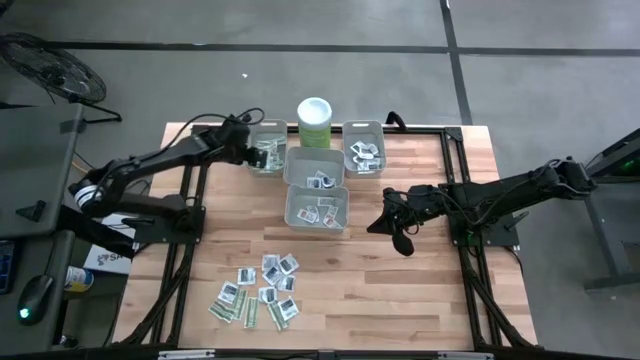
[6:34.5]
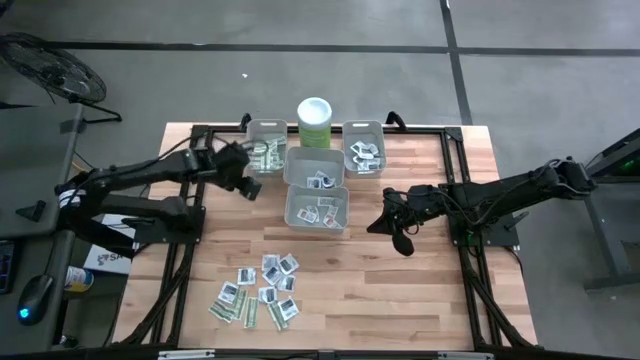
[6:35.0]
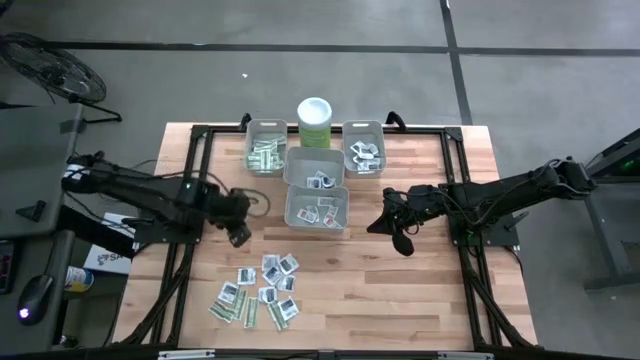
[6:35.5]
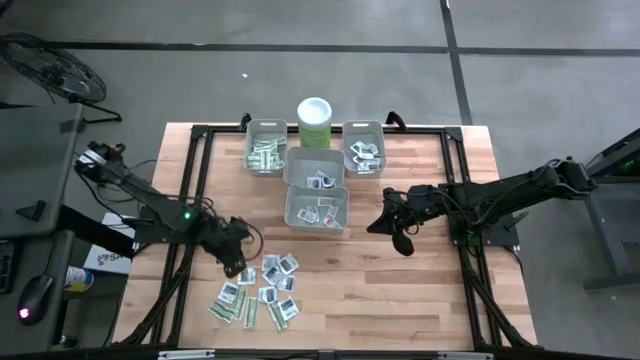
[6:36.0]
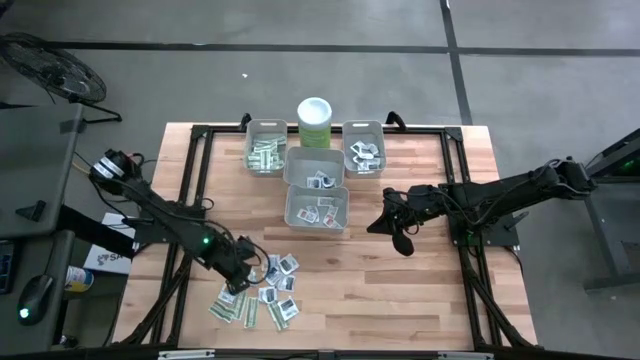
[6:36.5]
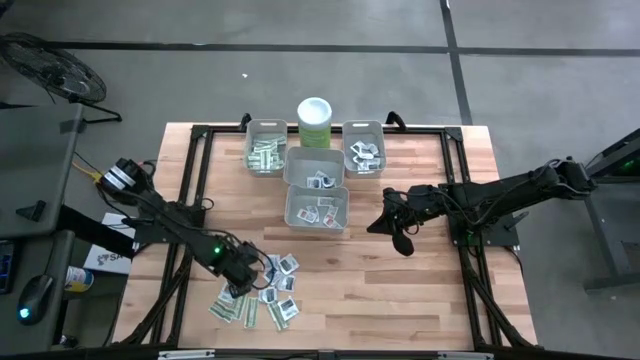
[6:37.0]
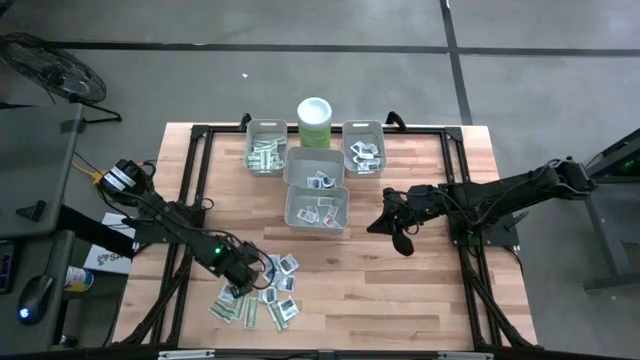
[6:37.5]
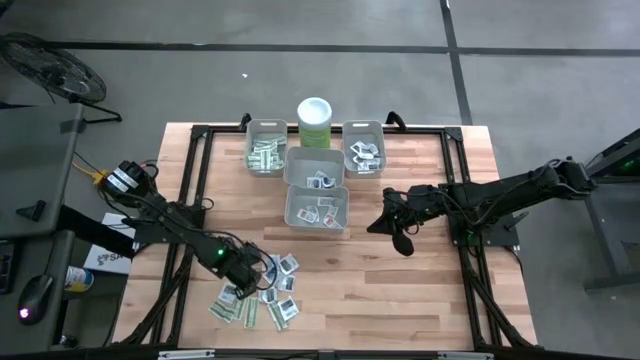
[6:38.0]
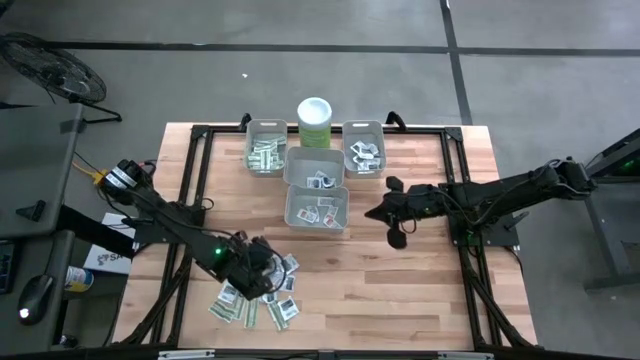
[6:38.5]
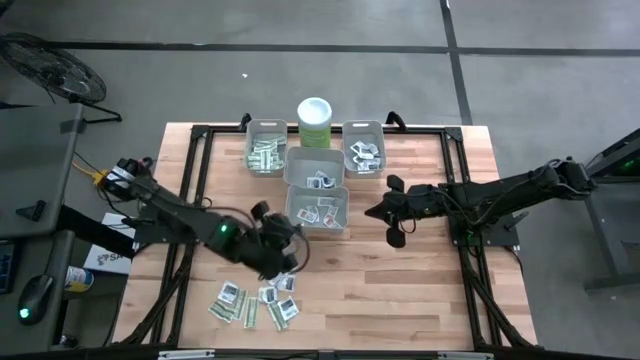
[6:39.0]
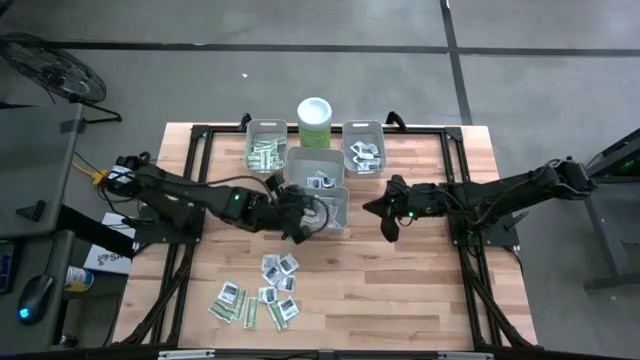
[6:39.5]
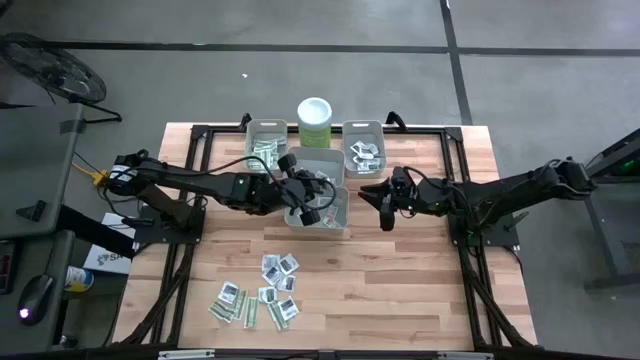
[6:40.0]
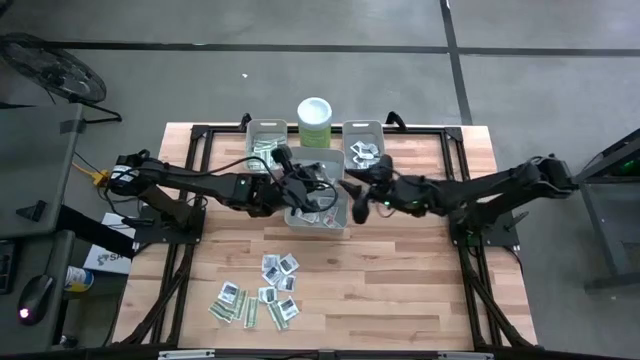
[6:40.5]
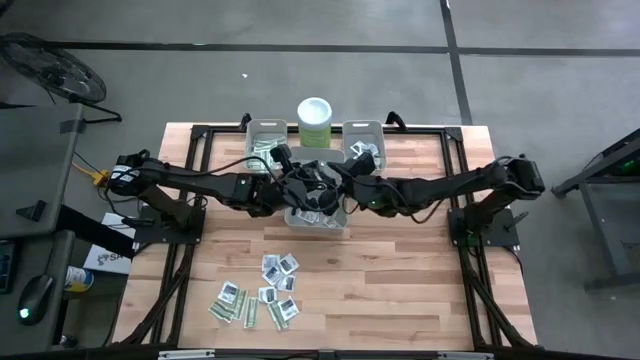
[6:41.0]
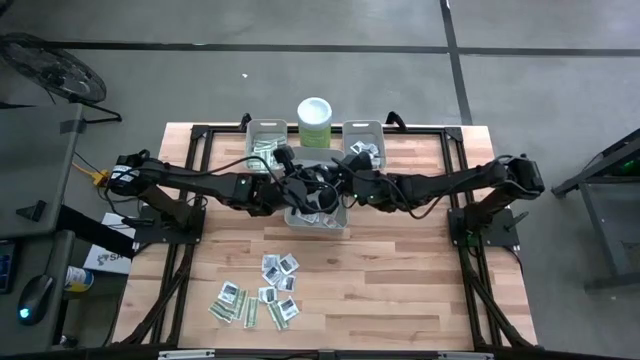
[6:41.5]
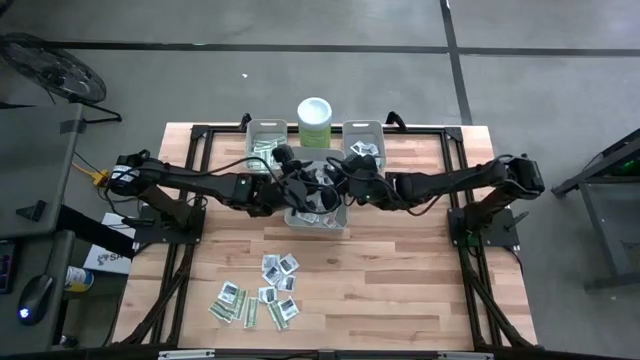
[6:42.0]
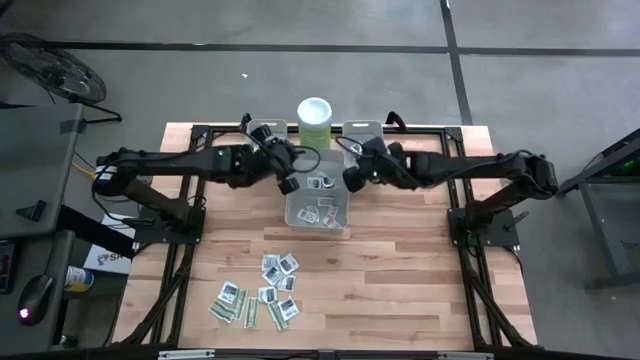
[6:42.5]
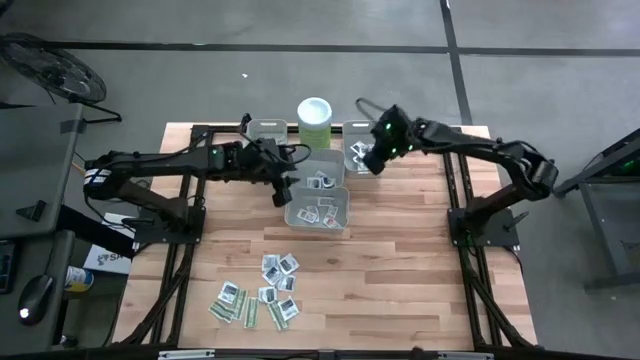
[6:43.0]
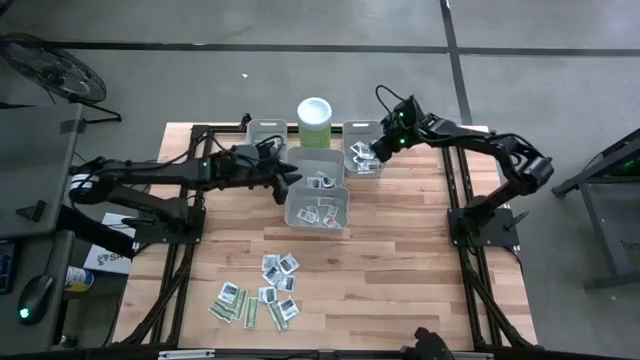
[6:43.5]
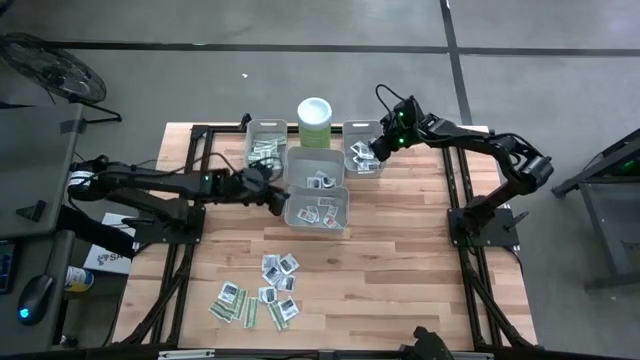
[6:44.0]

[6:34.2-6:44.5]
Task: Pick & Place First Aid Supplies
Put the towelette pack into the right bin

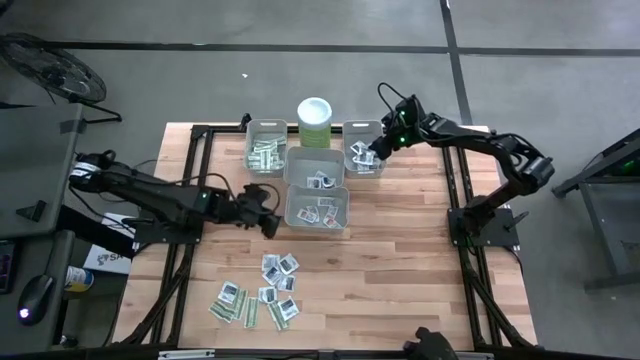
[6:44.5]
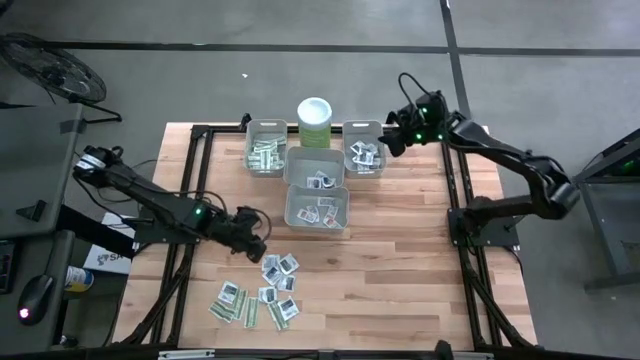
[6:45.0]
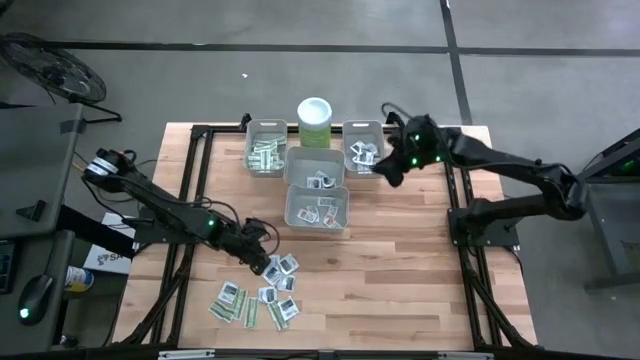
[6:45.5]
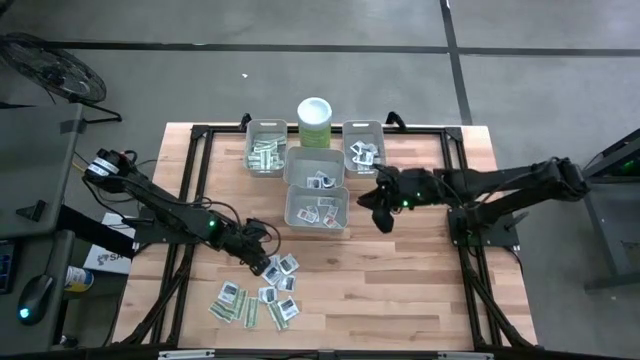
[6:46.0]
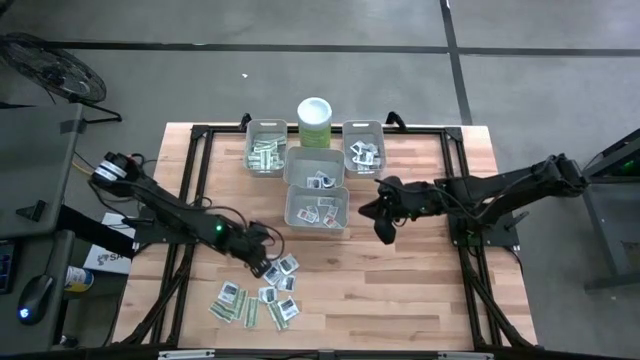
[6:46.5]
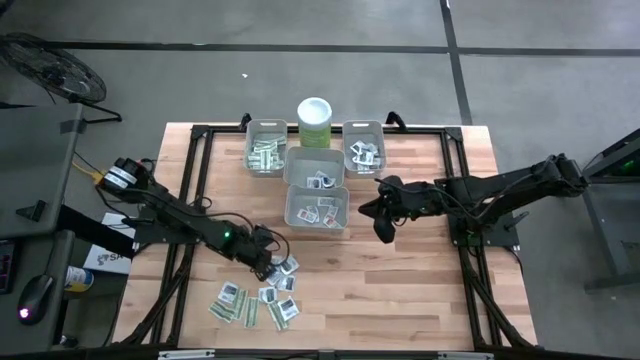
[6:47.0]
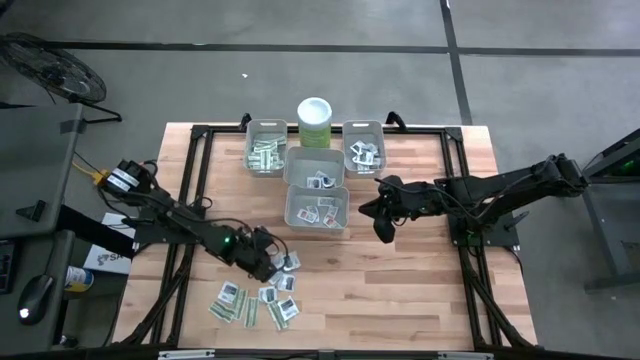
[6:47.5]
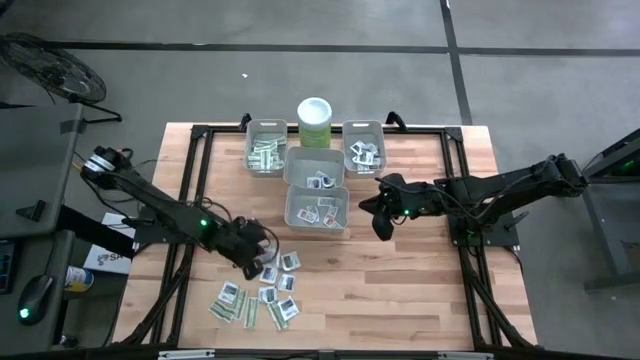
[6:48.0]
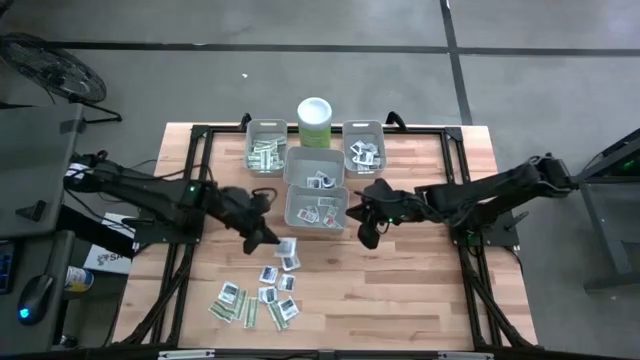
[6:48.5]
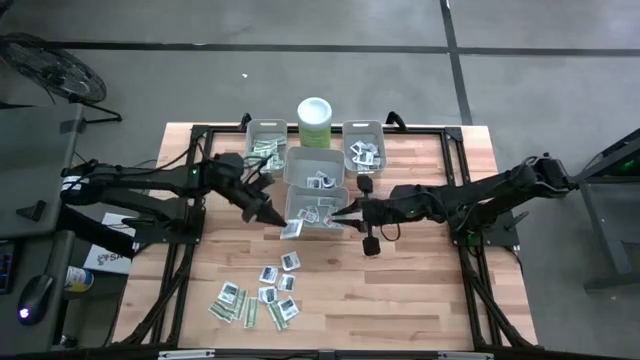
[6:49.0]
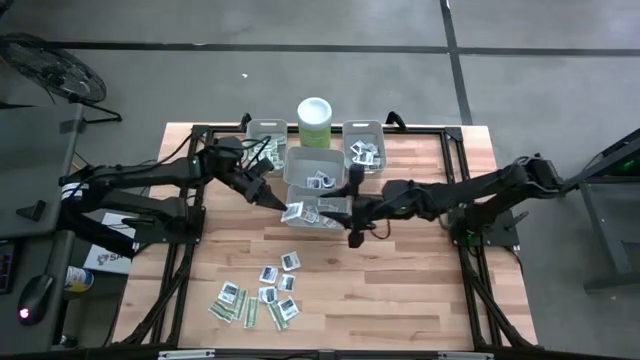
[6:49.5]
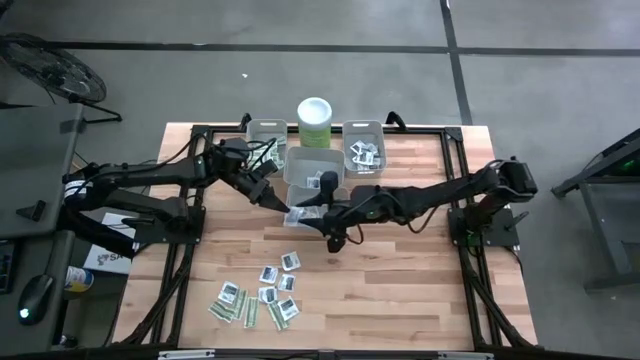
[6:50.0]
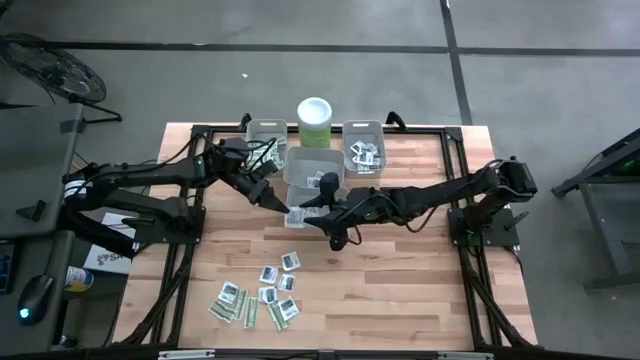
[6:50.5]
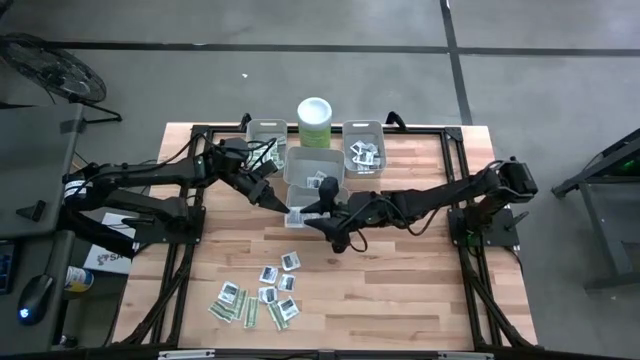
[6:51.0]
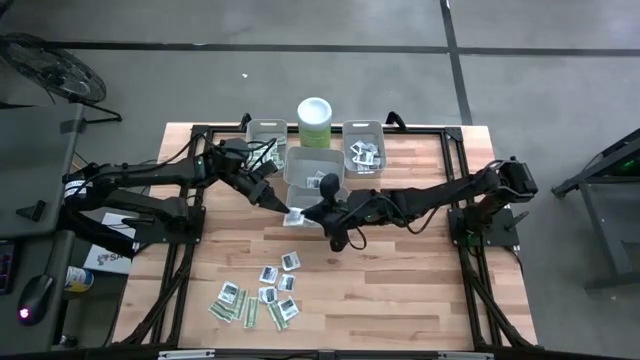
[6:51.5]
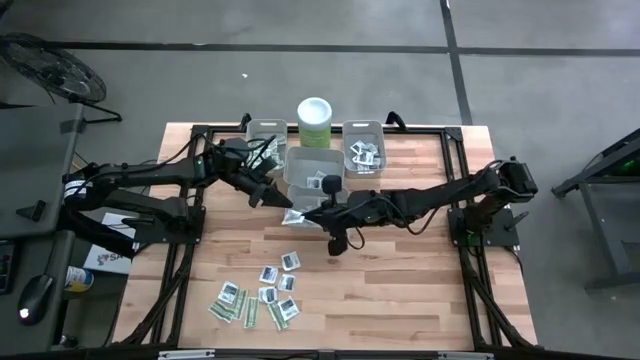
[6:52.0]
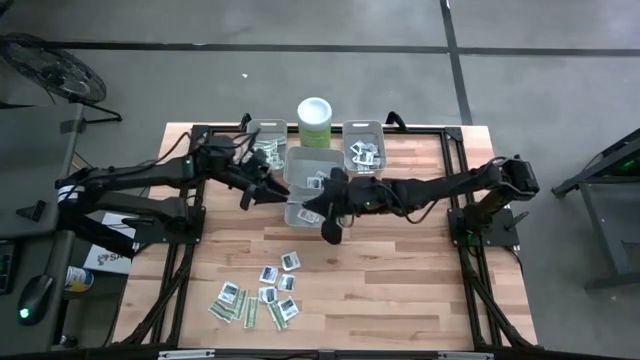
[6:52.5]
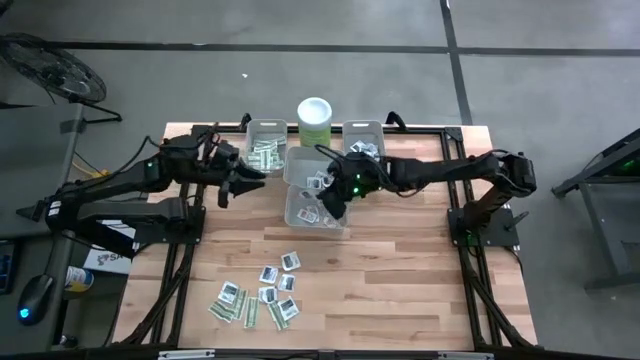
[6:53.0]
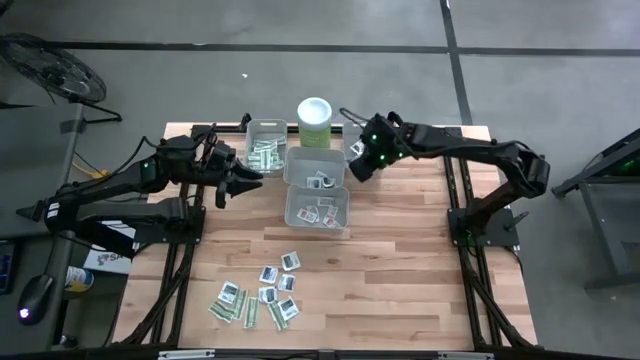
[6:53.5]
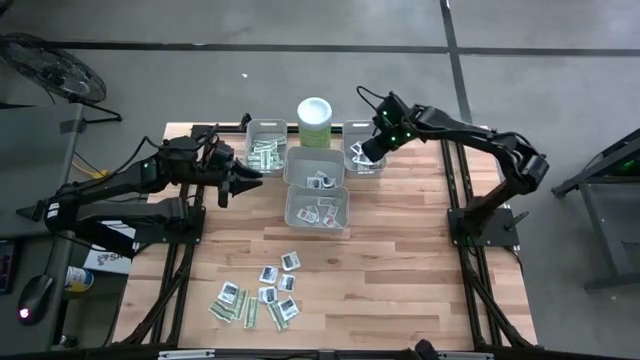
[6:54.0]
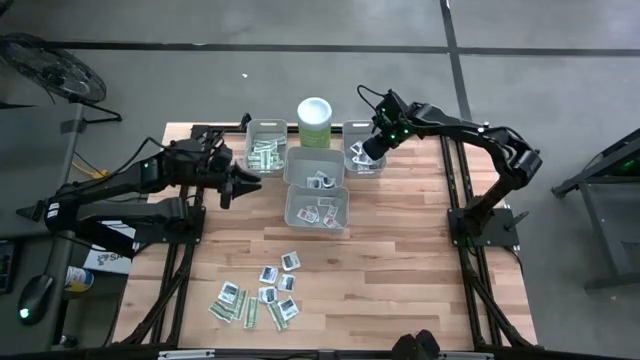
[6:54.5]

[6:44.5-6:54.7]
Put the towelette pack into the right bin

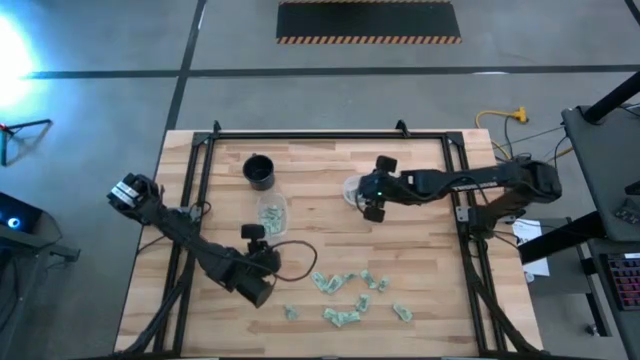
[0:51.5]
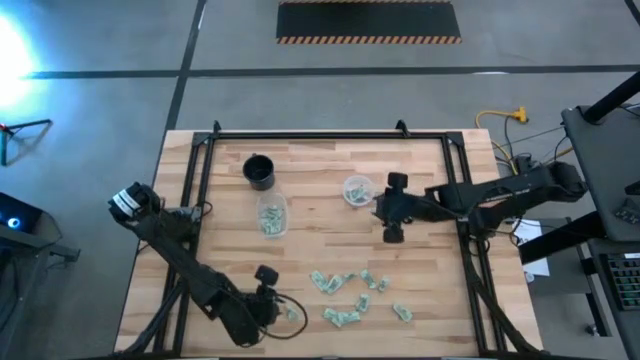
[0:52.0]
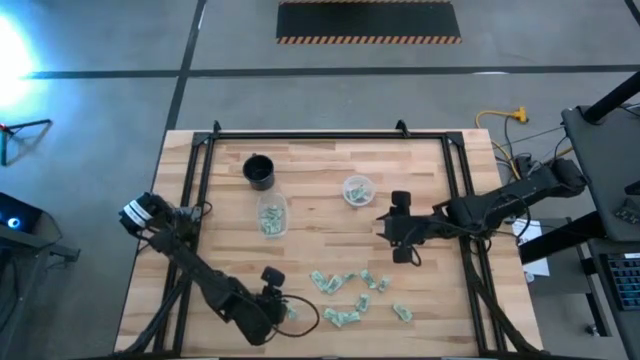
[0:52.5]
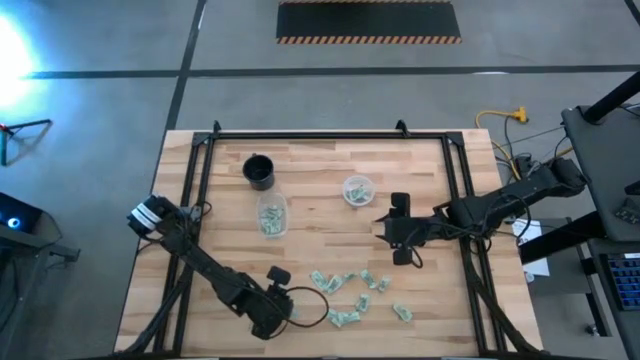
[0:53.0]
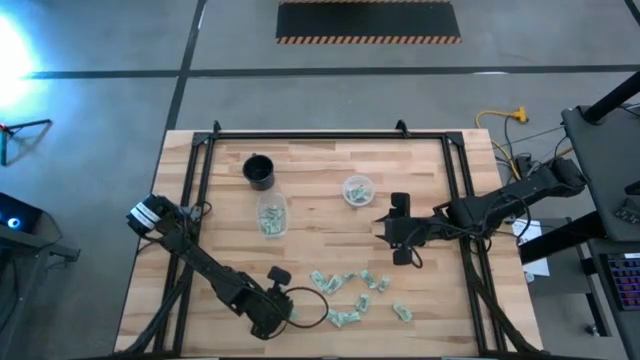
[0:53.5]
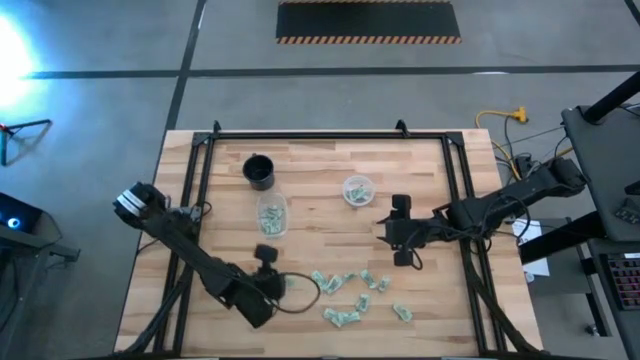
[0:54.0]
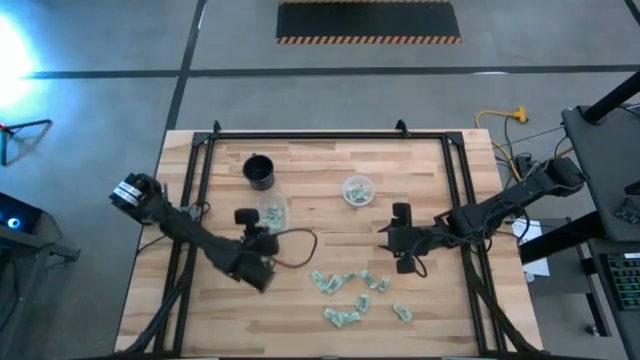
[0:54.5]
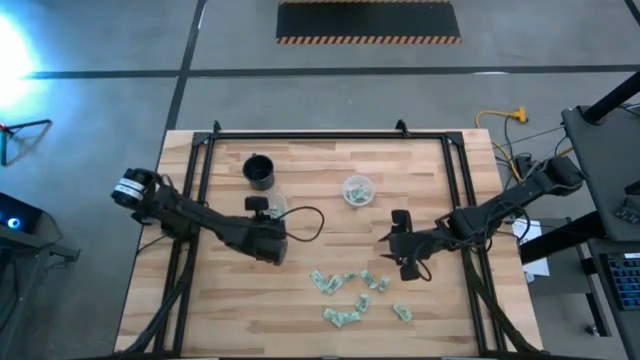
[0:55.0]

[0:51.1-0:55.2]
Task: Pick and place items into bin
Put the stevia packet into the left transparent bin
